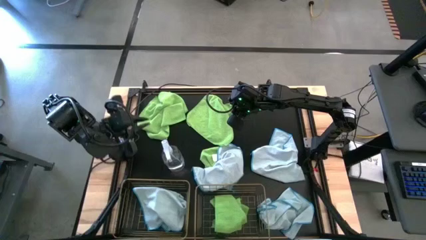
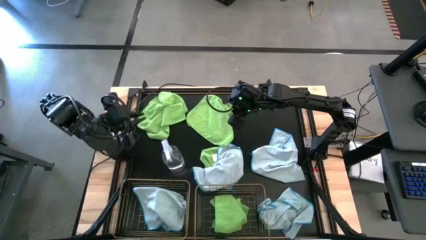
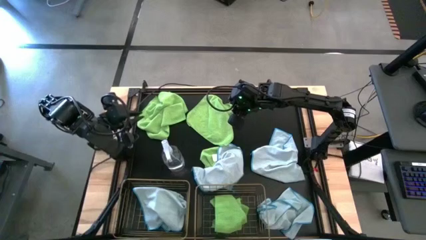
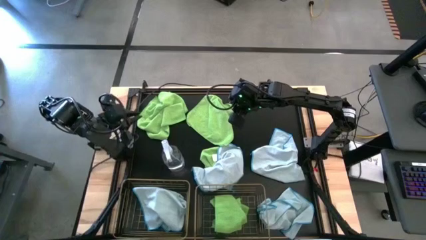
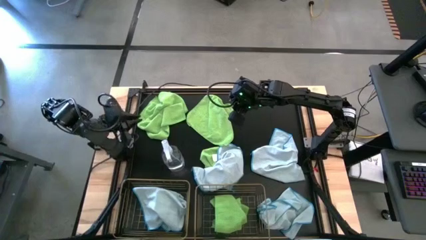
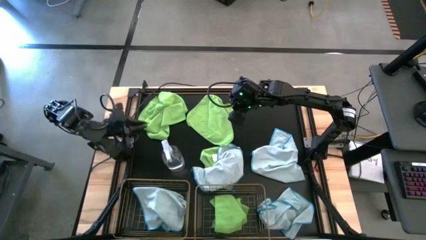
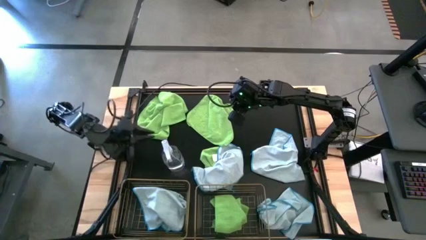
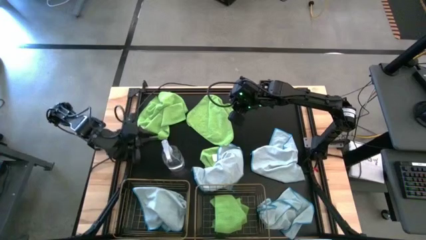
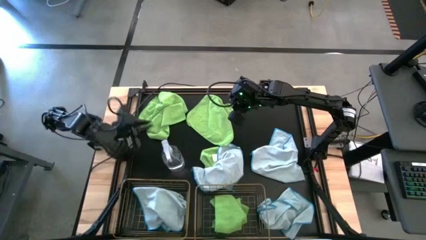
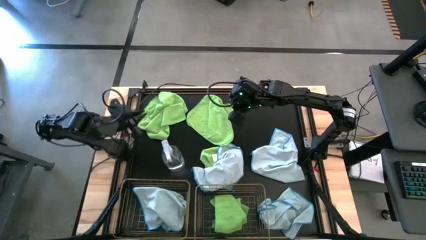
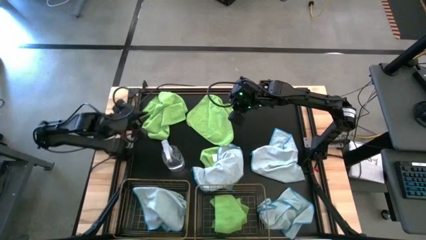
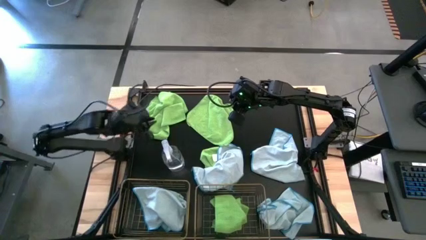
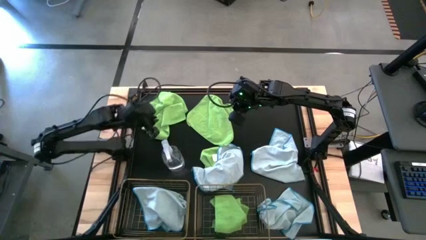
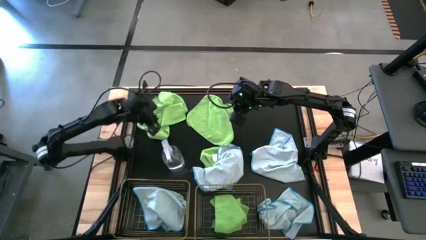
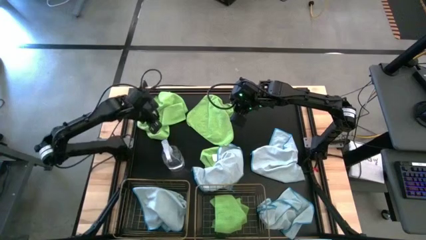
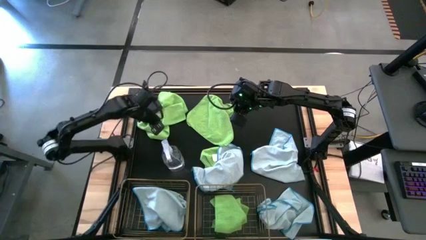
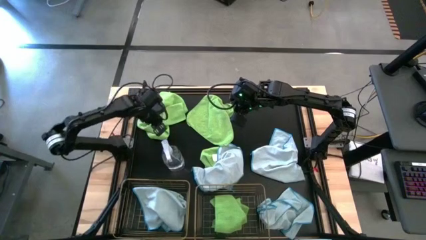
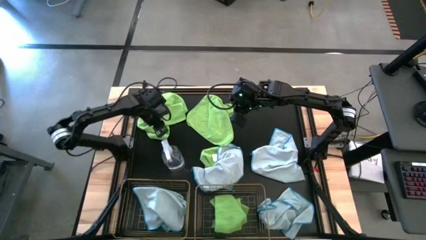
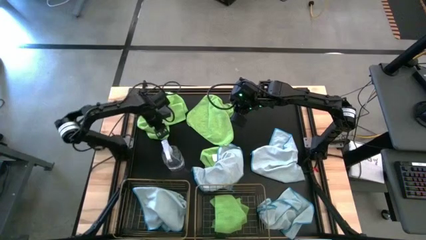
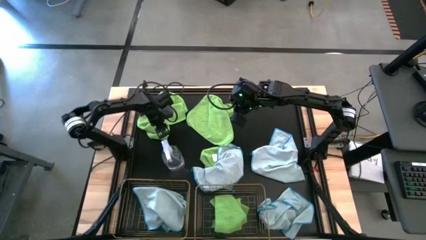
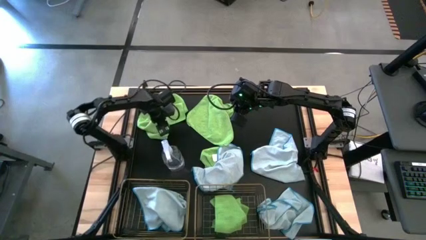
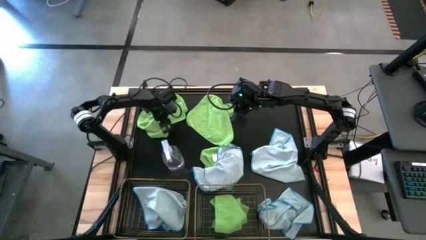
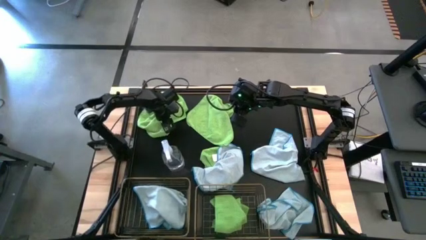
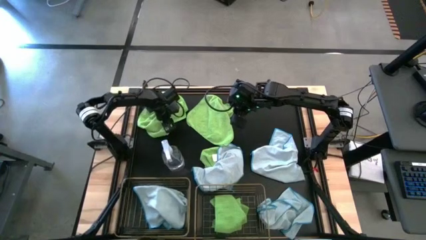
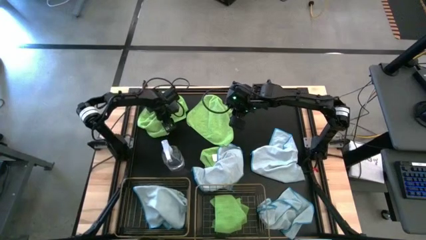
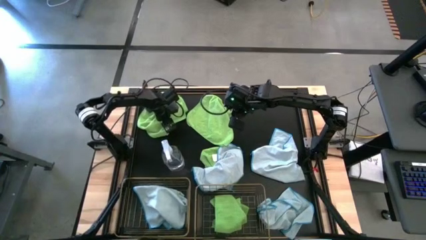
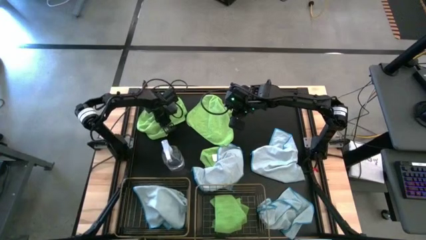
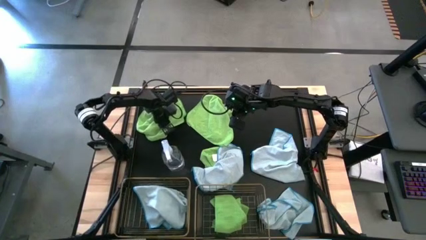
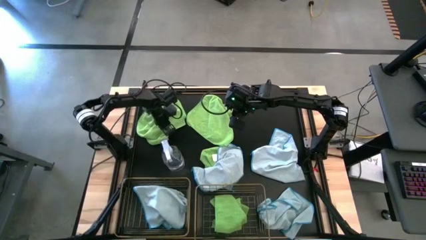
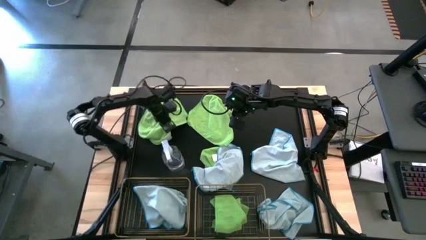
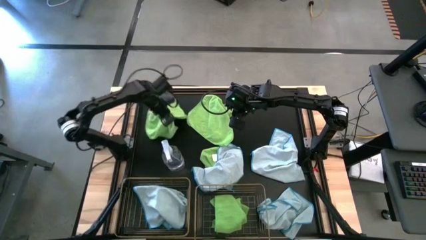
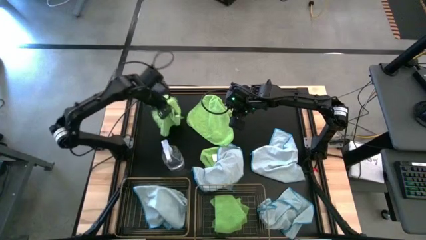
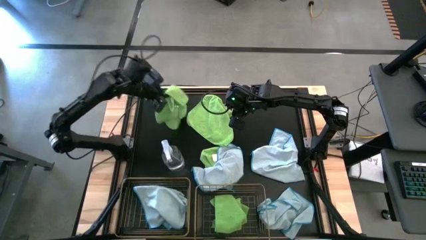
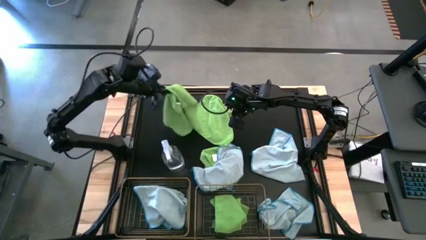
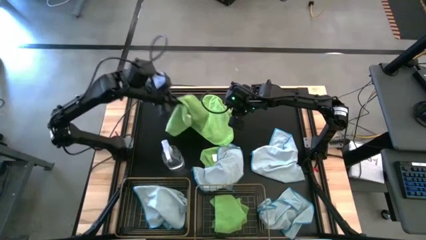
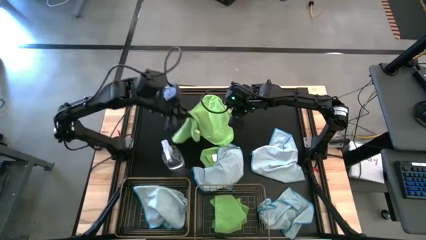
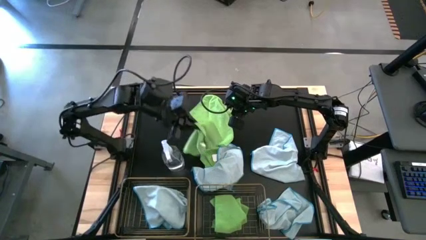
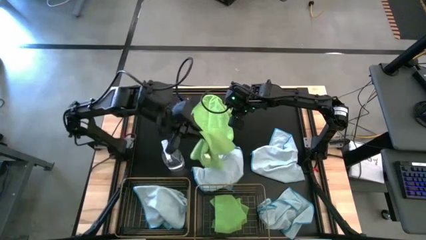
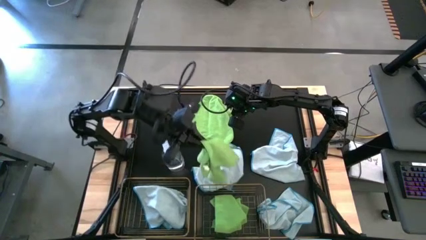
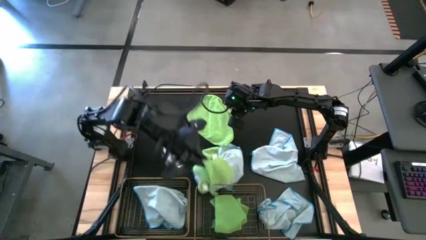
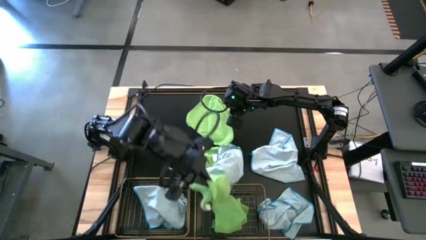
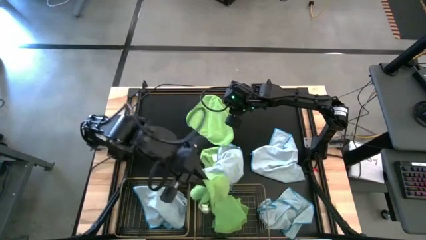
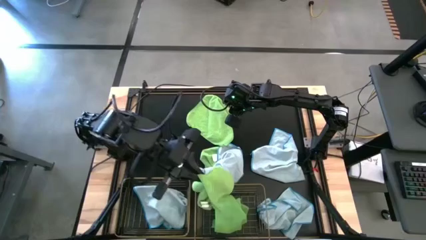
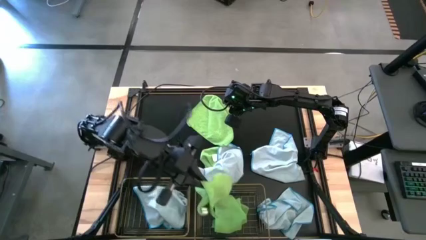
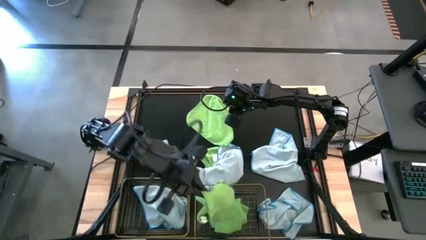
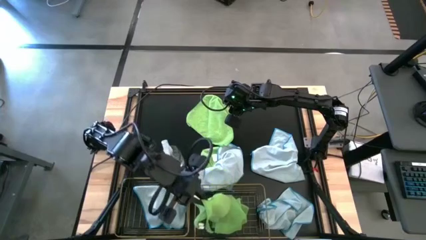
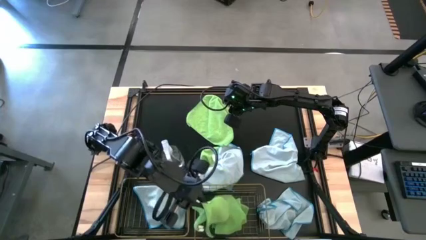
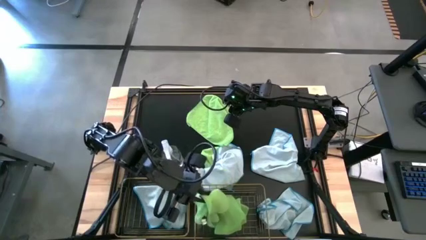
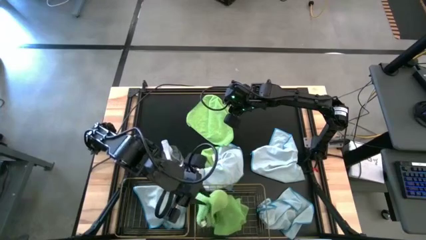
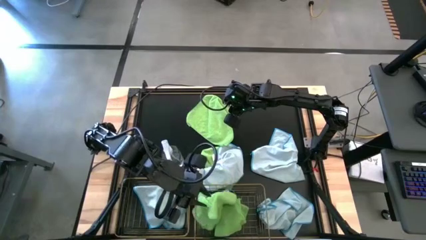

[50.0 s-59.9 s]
Task: Sort microfiber towel by color & place in baskets
Put the green microfiber cloth into the right wire basket

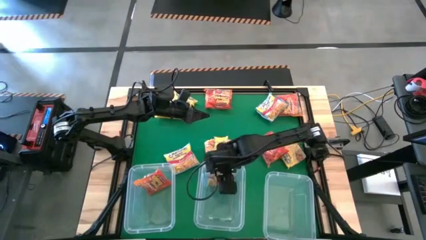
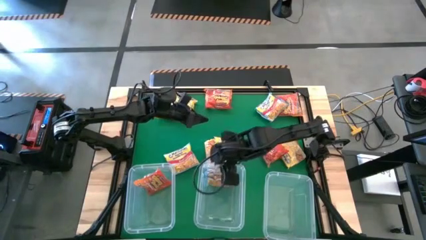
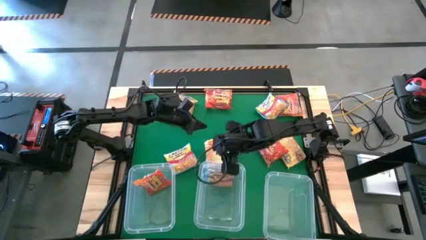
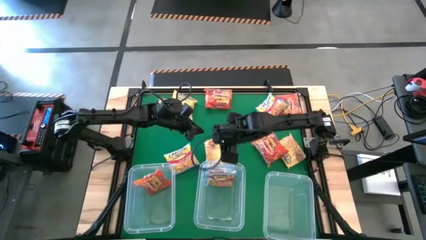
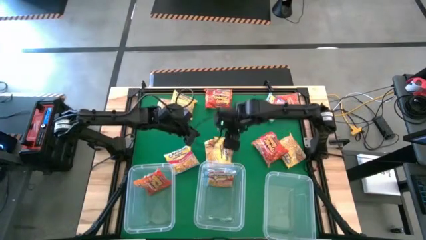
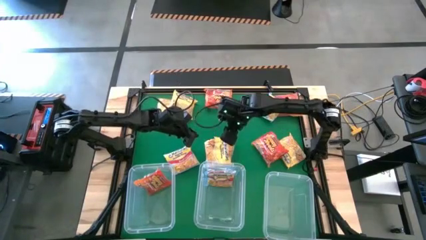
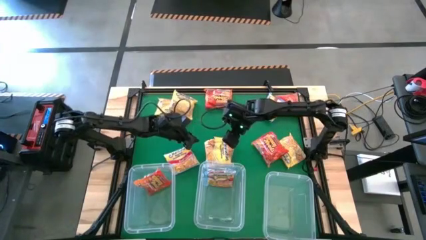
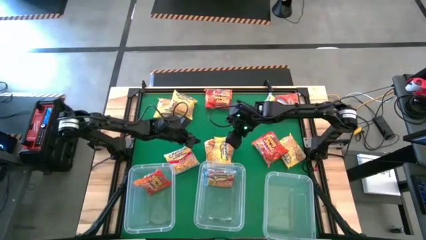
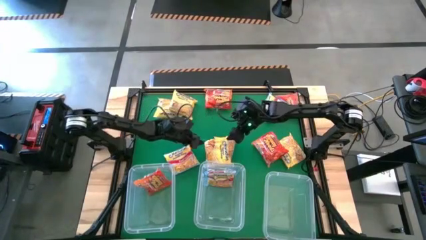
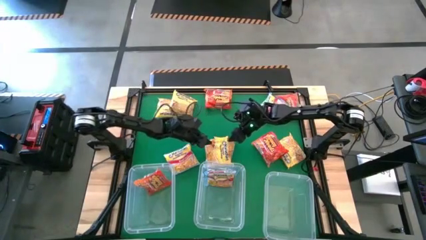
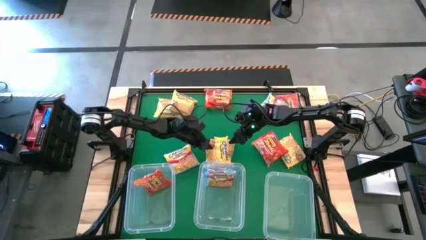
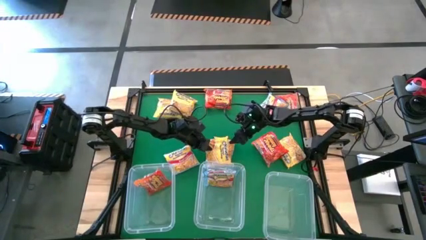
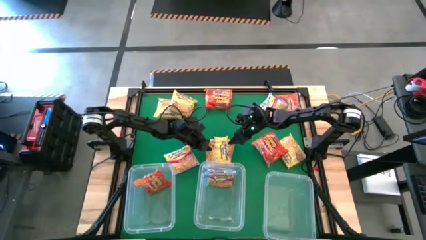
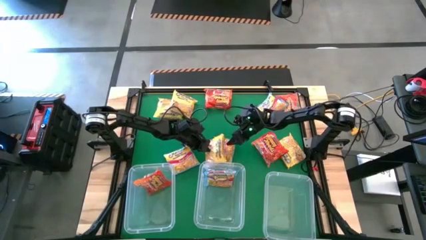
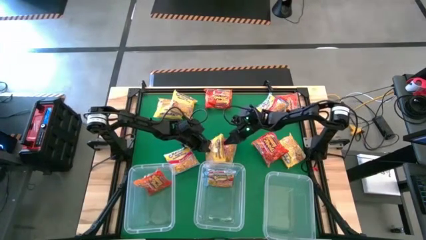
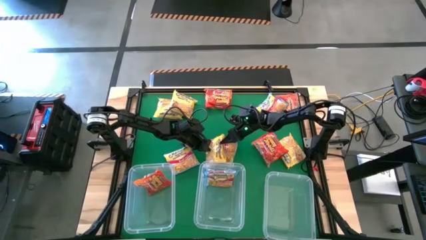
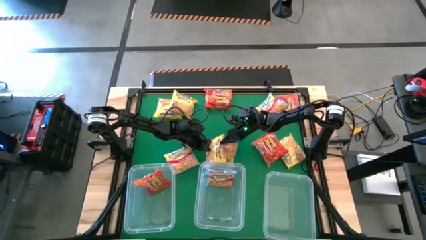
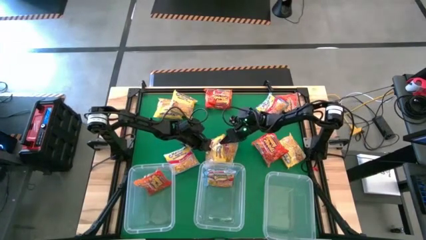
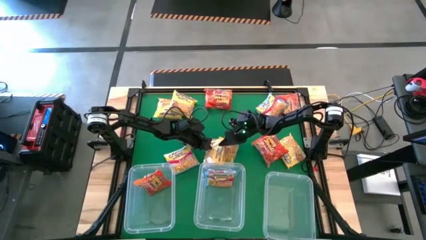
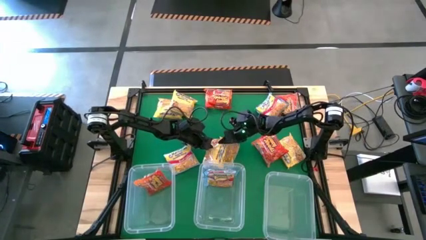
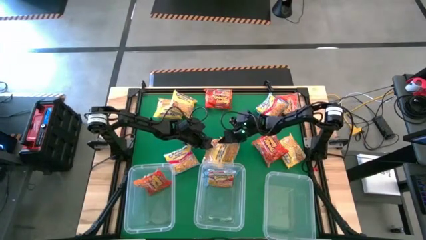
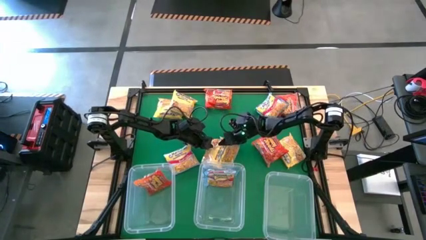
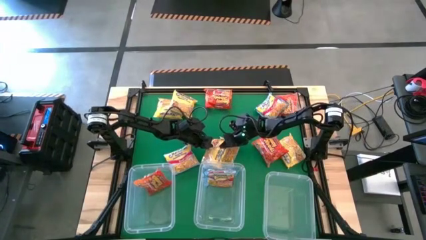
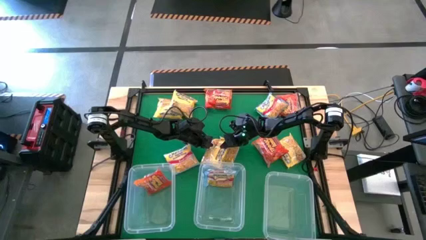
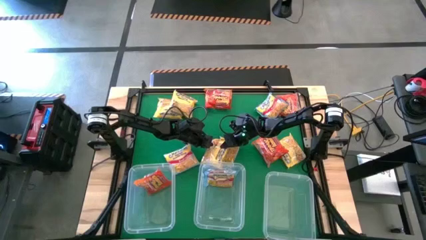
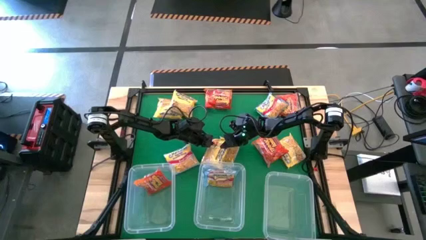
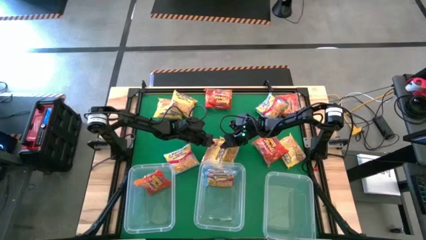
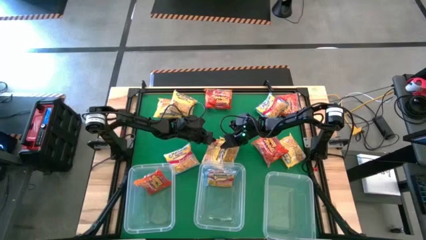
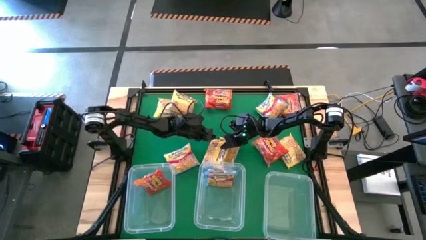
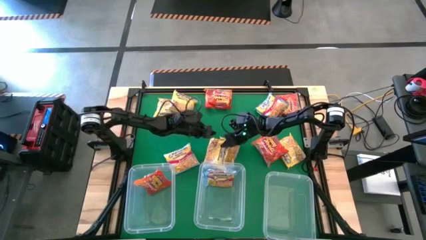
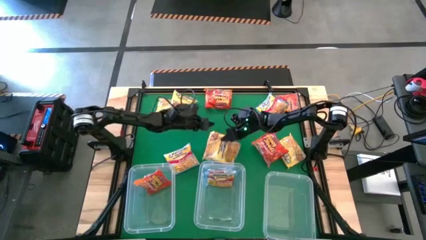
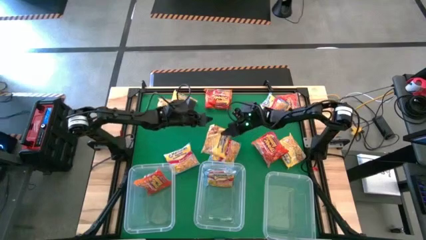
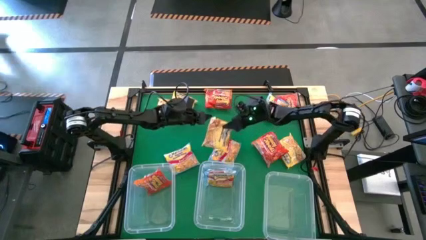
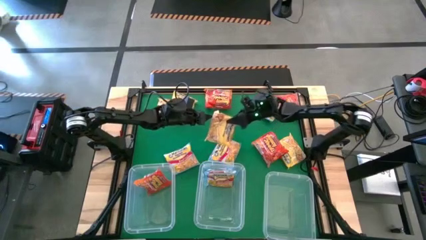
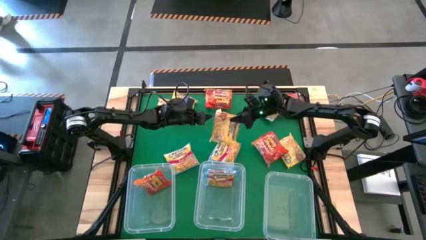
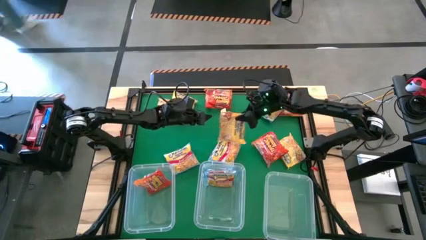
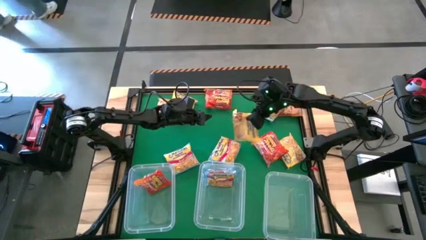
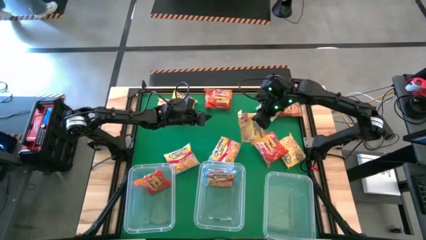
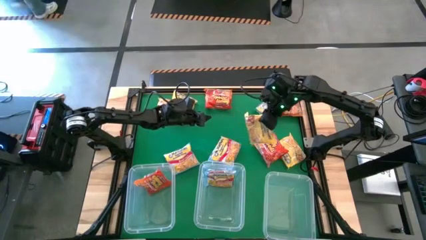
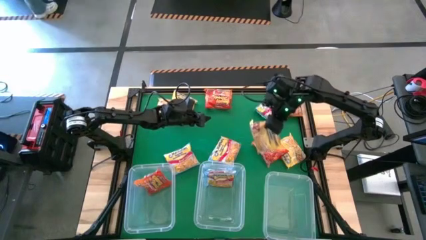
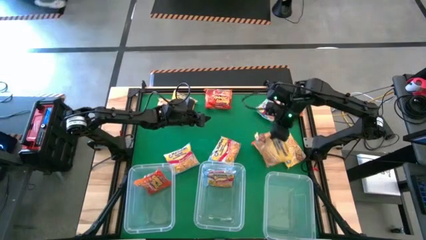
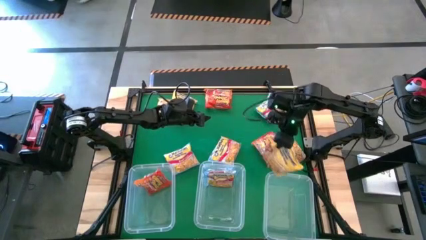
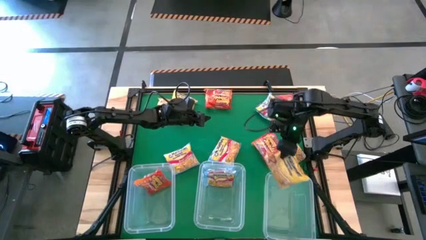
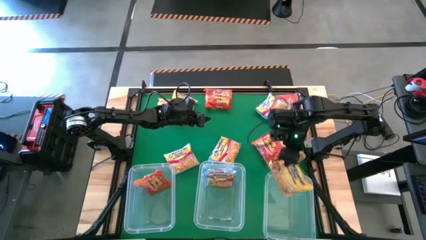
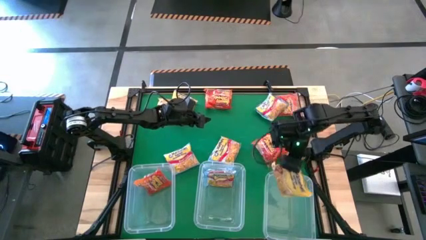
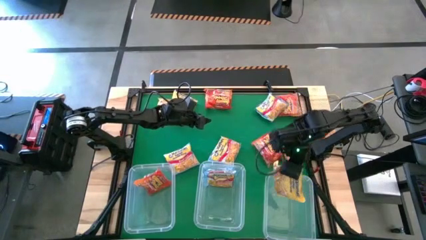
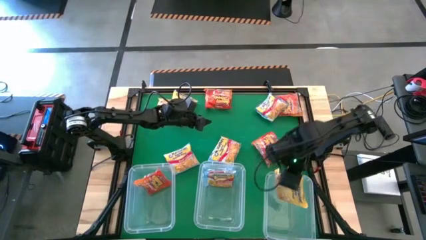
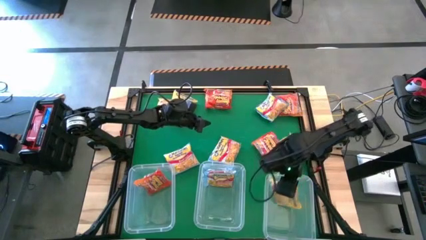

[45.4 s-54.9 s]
Task: Sort Maruchan noodles
Put the yellow noodle pack into the right transparent bin
